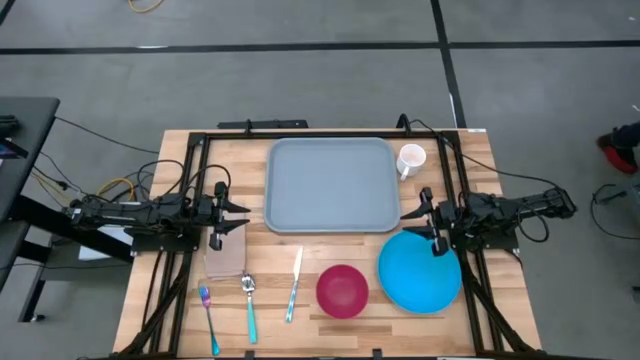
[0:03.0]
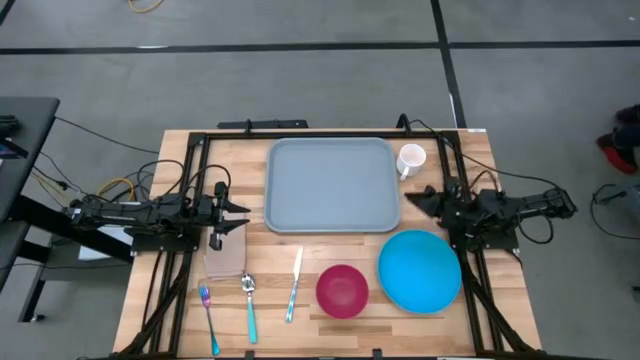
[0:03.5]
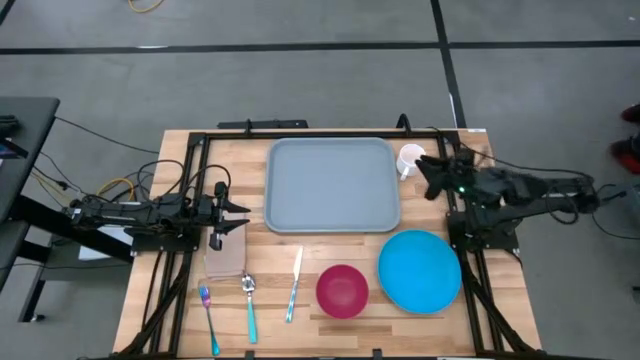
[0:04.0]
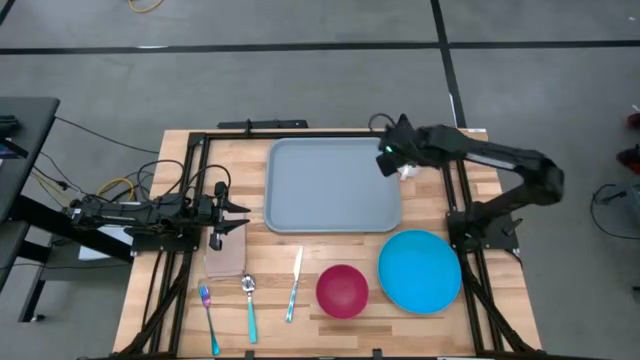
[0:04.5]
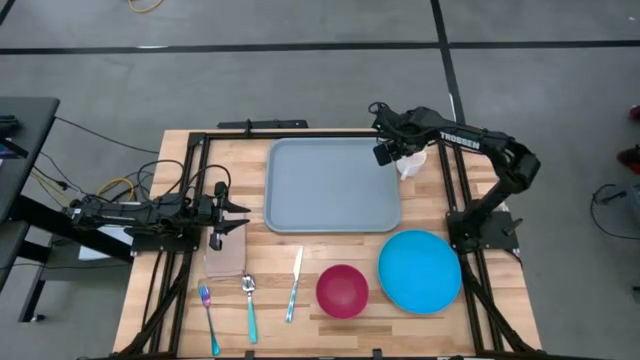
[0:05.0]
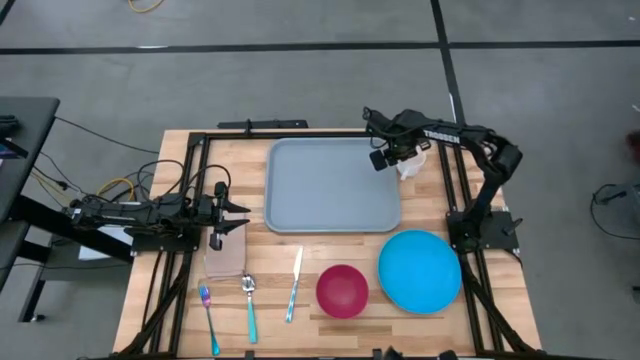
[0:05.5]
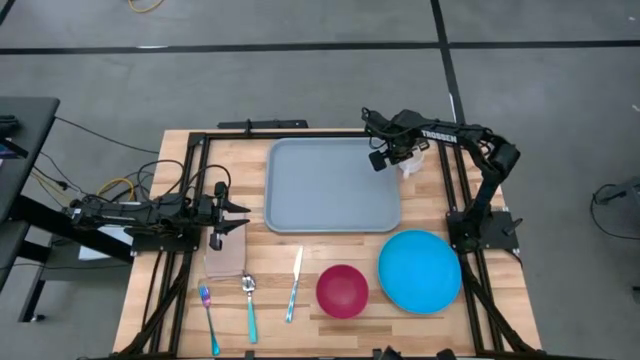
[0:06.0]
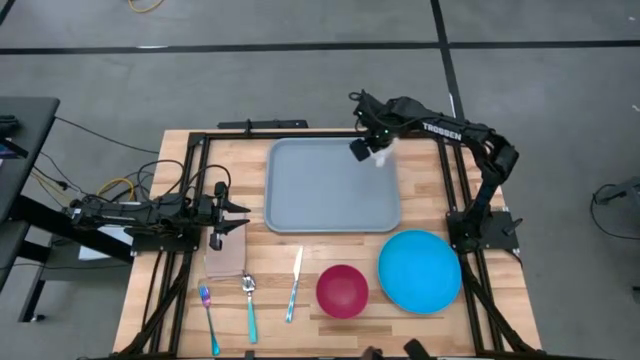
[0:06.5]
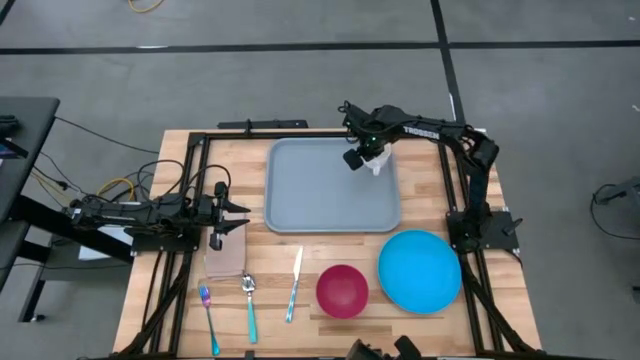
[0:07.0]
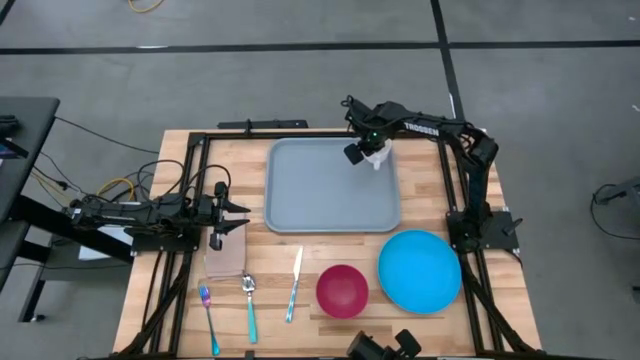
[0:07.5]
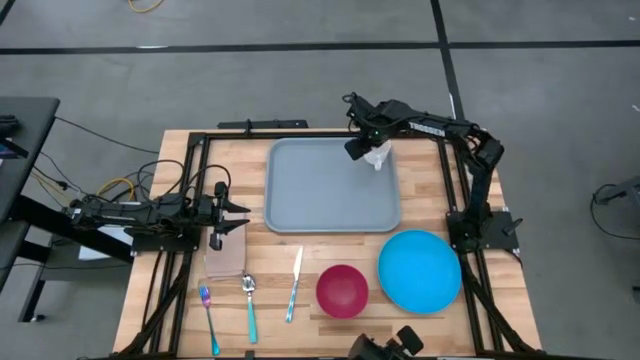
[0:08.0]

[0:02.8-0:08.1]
Task: Set up tray
Put the white cup on the gray tray

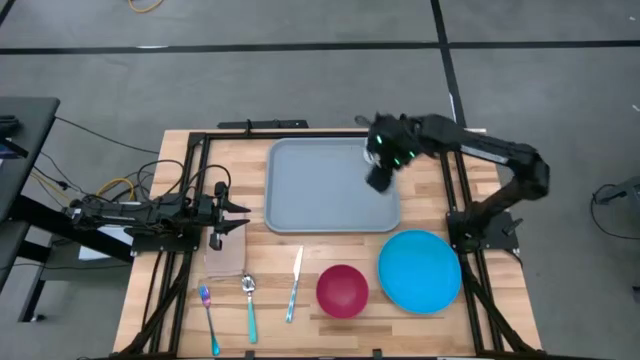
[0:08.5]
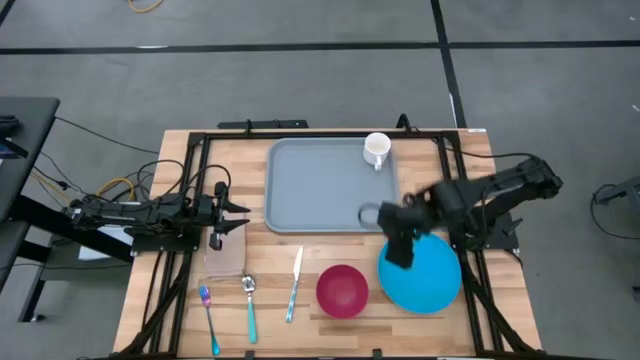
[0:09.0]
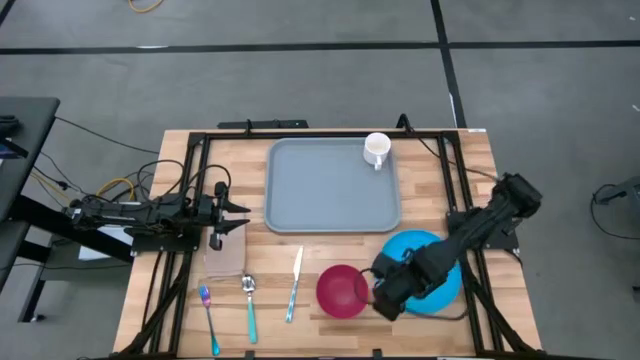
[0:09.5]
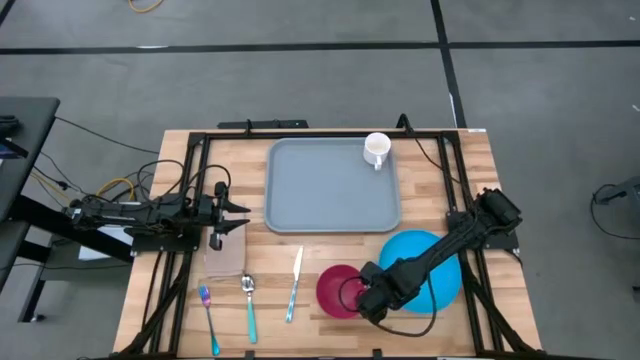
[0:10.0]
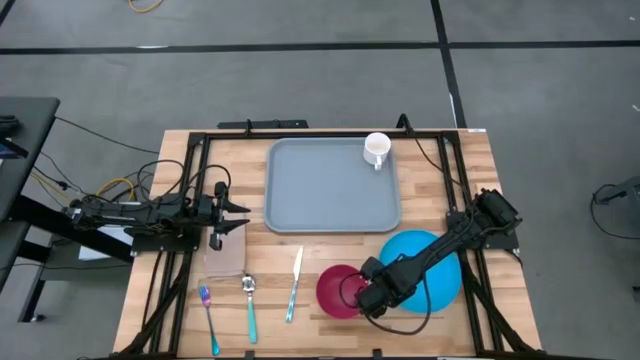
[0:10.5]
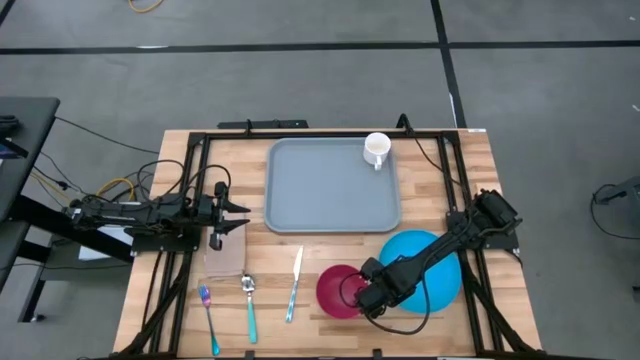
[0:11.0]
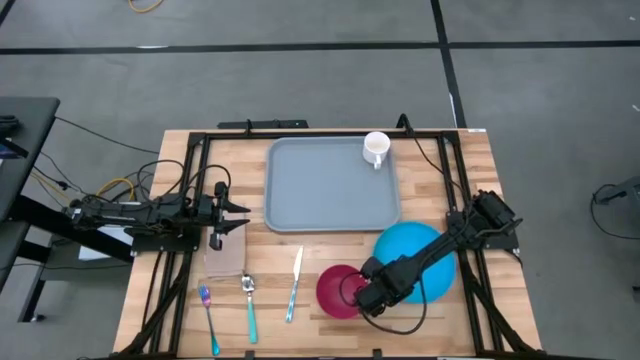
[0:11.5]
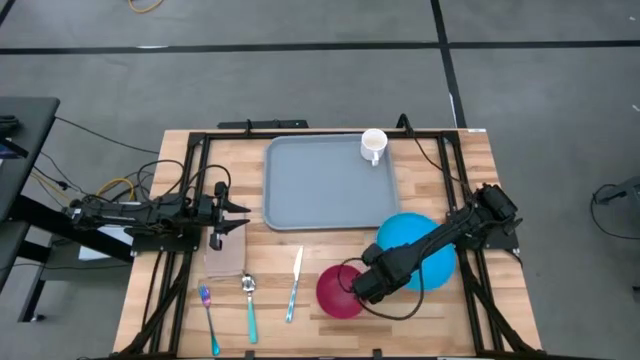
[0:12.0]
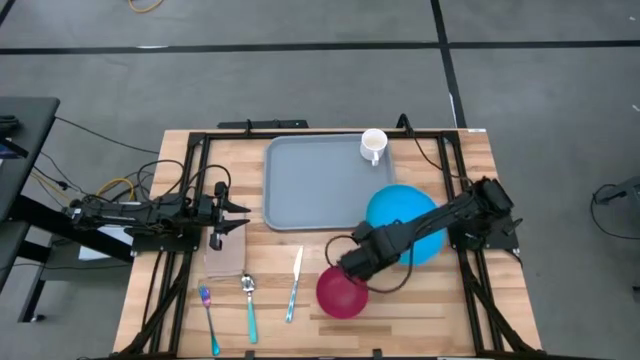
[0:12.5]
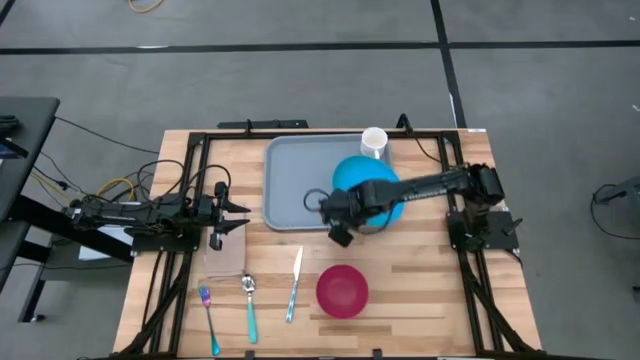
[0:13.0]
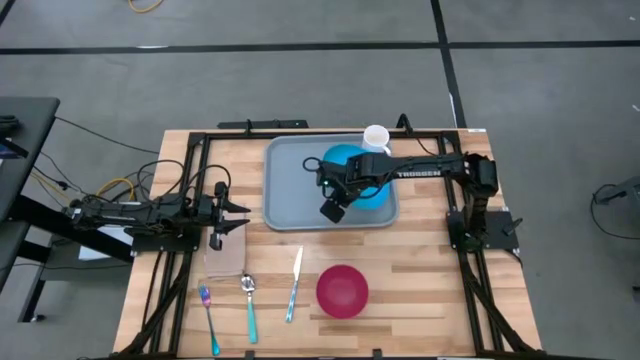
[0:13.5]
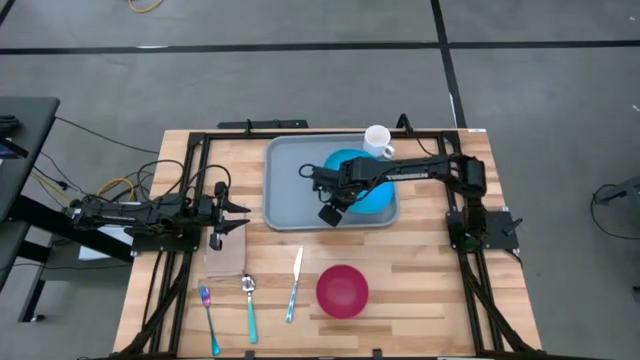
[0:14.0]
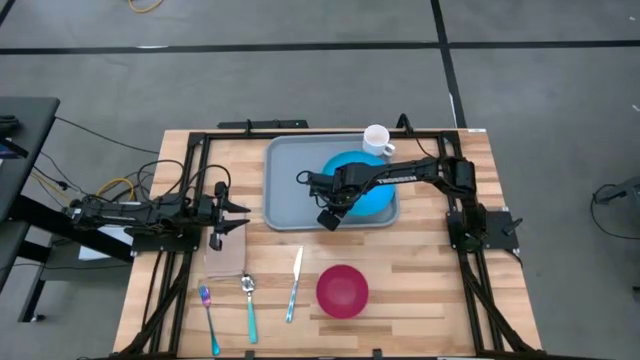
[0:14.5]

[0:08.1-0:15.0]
Put the blue plate on the gray tray

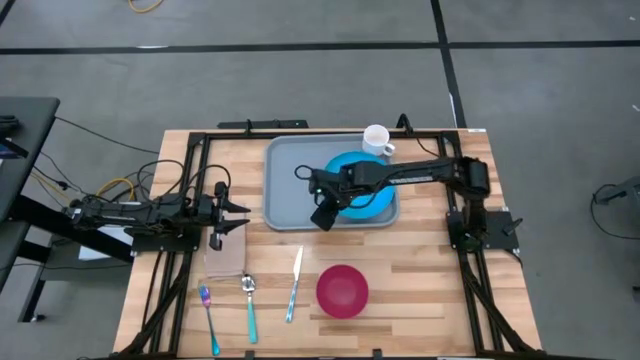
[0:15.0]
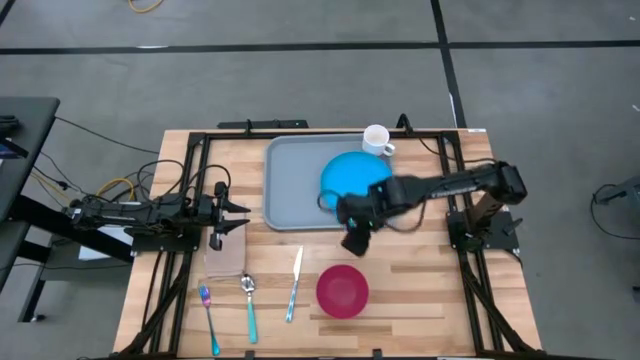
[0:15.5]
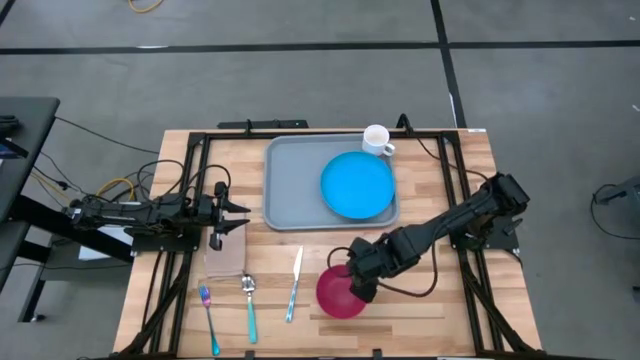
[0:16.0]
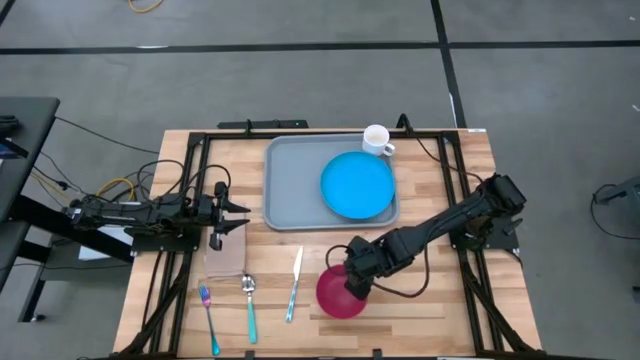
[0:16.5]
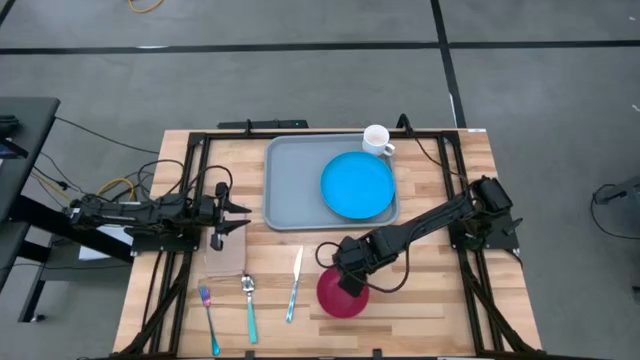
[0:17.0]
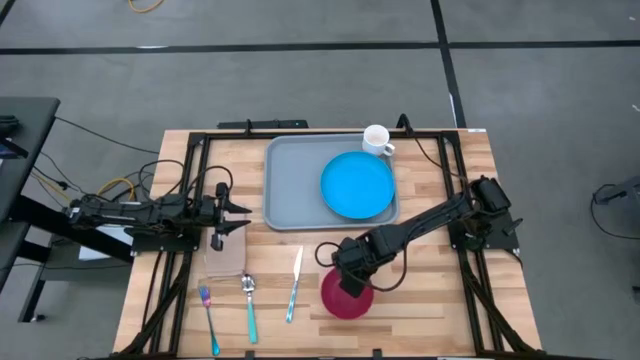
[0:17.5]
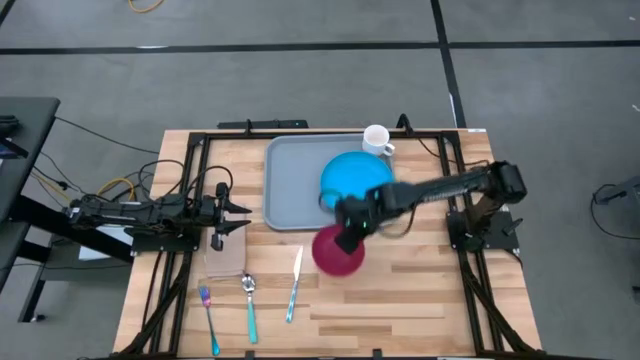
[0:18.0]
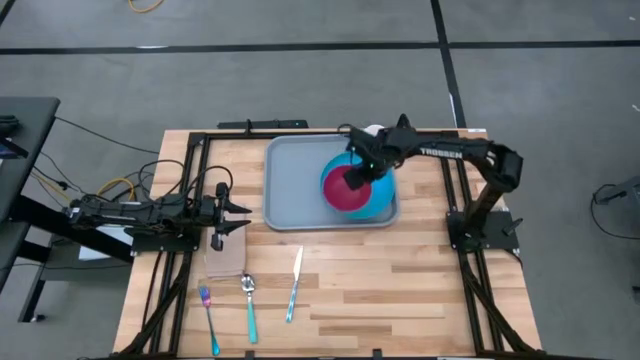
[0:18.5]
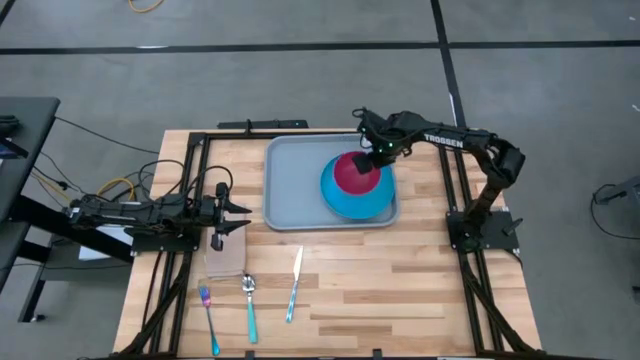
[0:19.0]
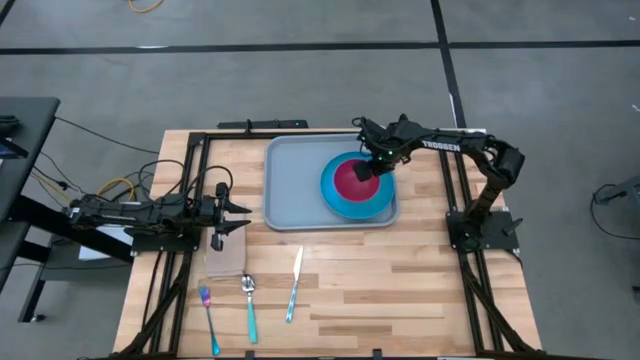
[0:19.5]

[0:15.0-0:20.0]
Put the dark pink bowl on the blue plate

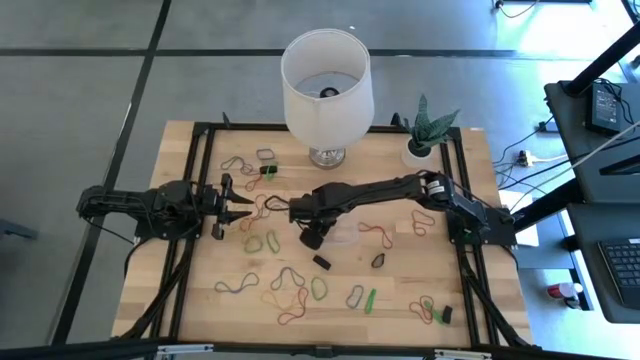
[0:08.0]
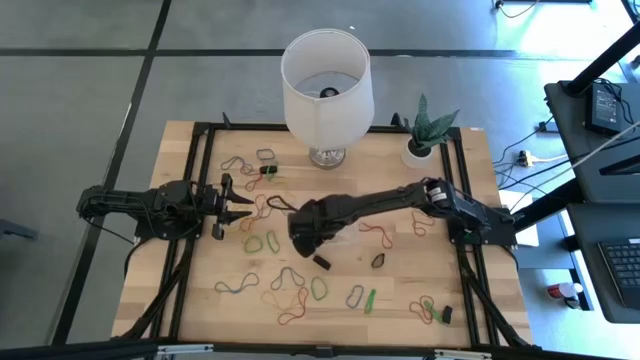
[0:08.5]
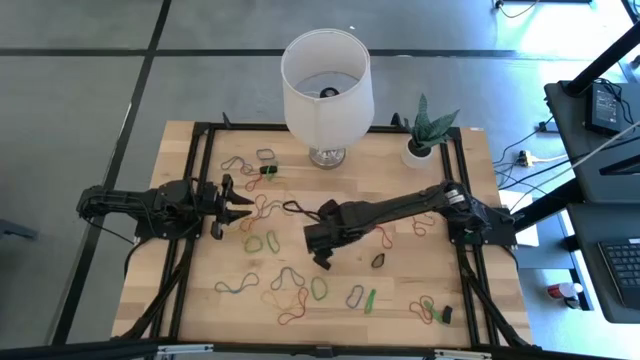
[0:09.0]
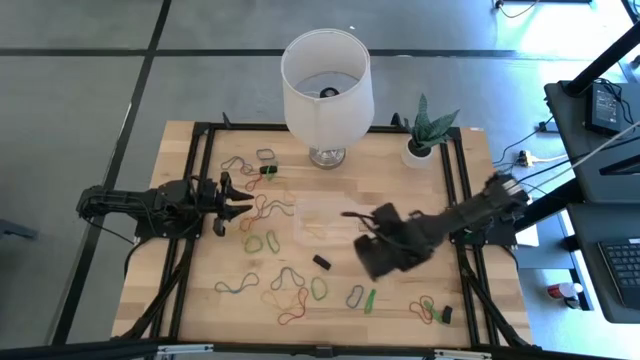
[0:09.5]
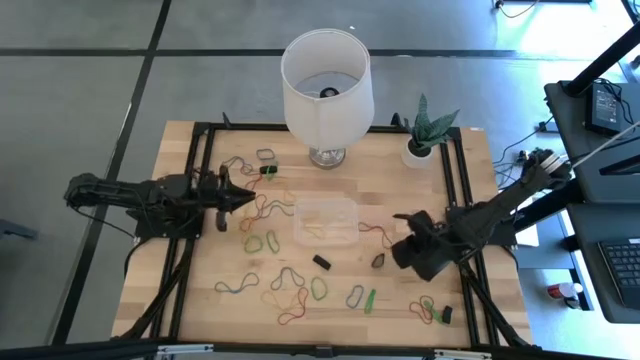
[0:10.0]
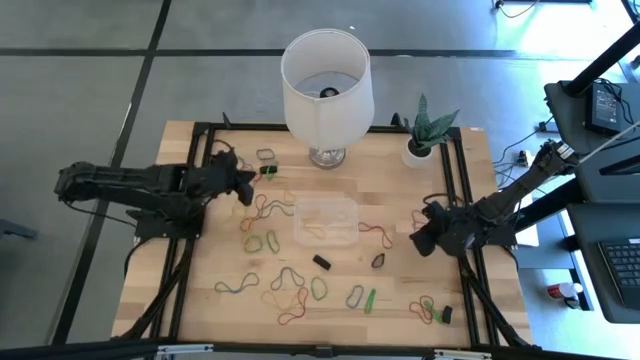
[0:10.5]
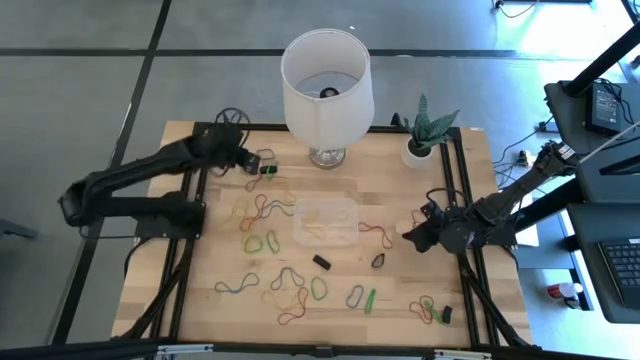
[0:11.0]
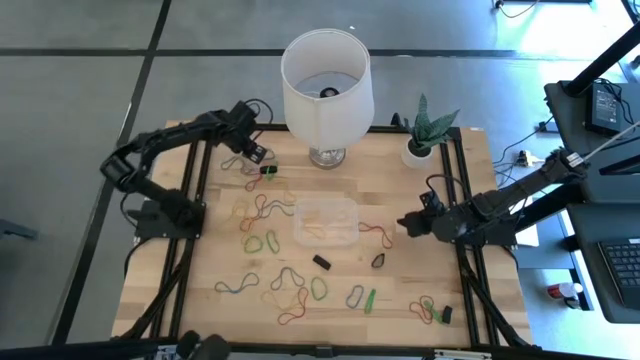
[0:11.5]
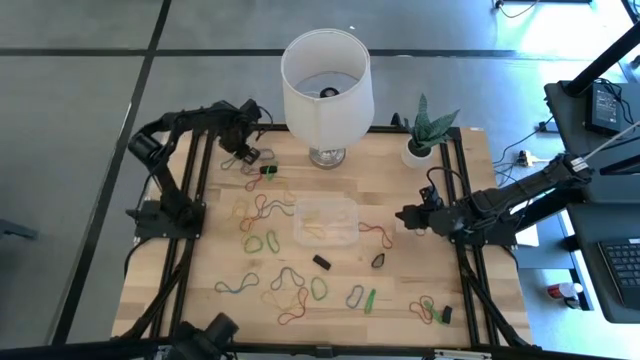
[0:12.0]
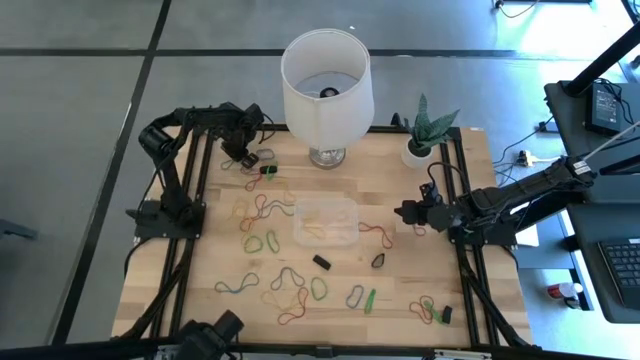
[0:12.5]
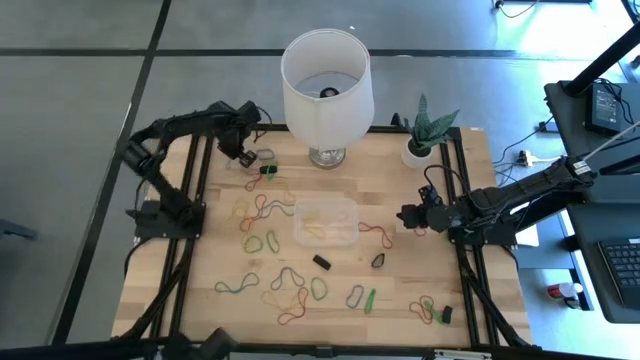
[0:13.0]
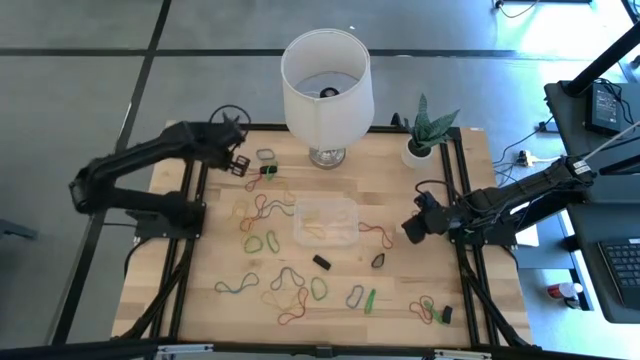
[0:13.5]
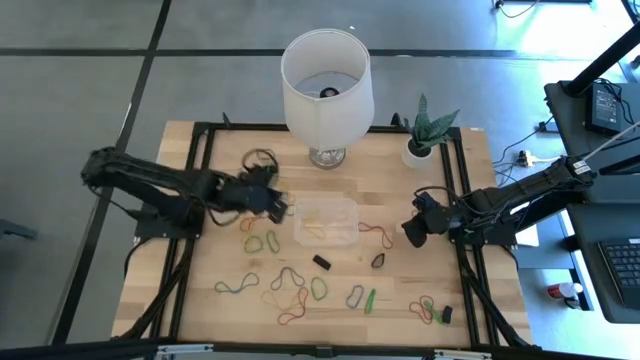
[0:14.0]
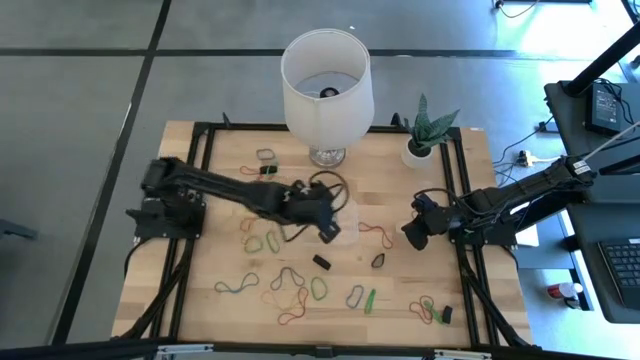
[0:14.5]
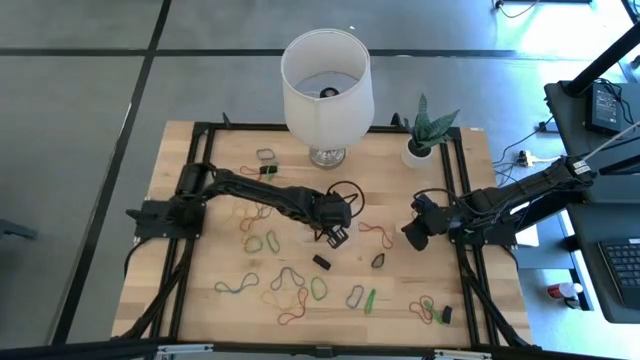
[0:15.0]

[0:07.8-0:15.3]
Task: Pick and place rubber bands into bin
Put the blue rubber band into the container
